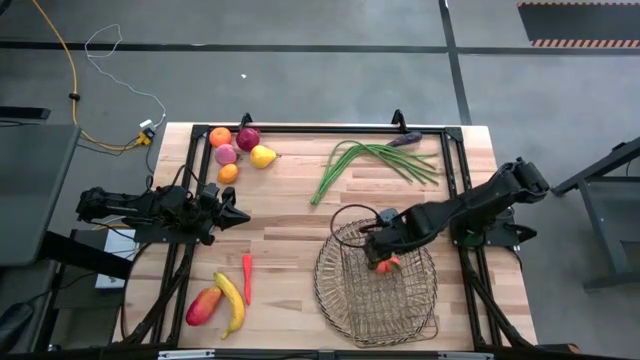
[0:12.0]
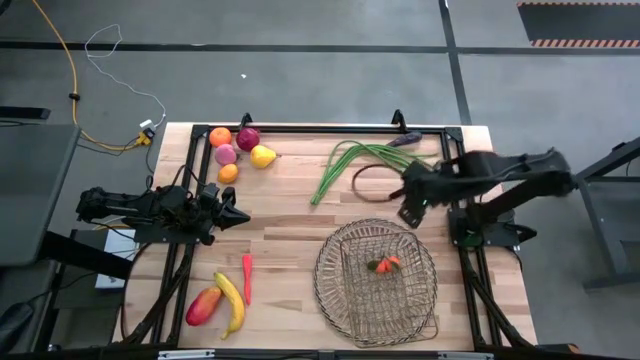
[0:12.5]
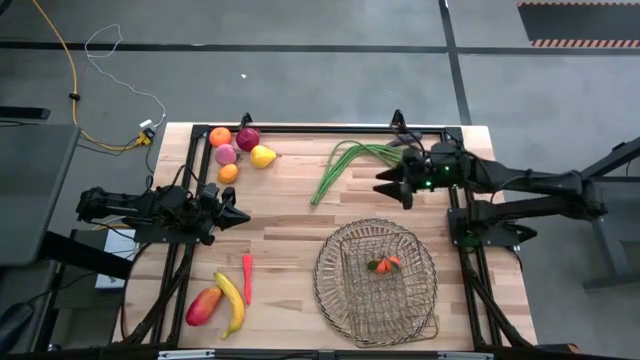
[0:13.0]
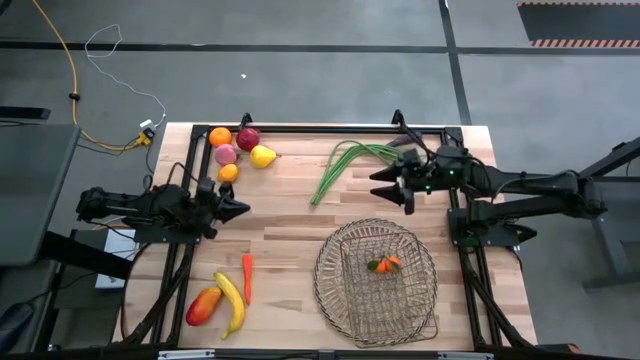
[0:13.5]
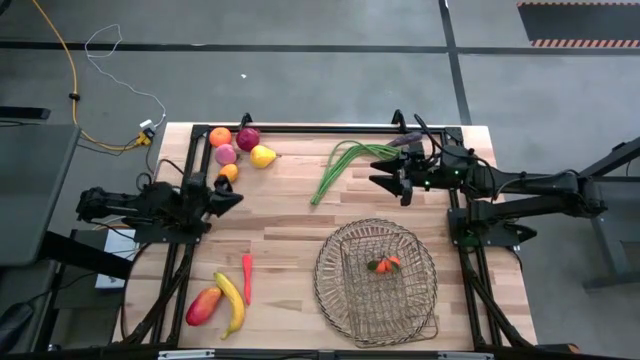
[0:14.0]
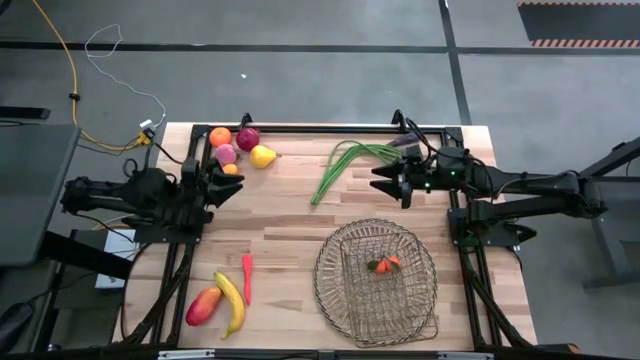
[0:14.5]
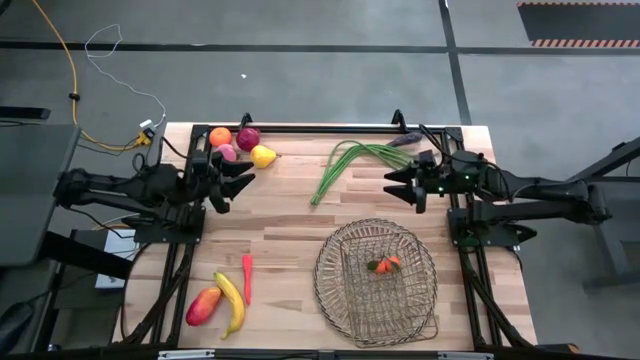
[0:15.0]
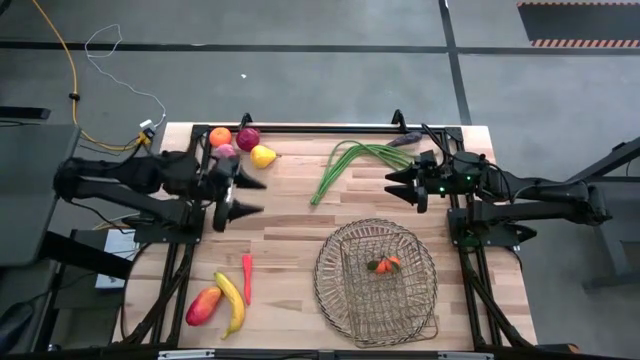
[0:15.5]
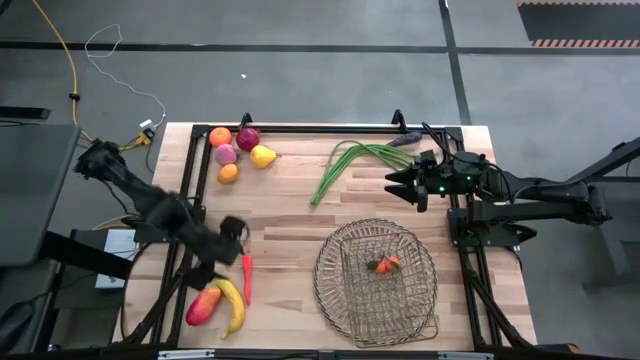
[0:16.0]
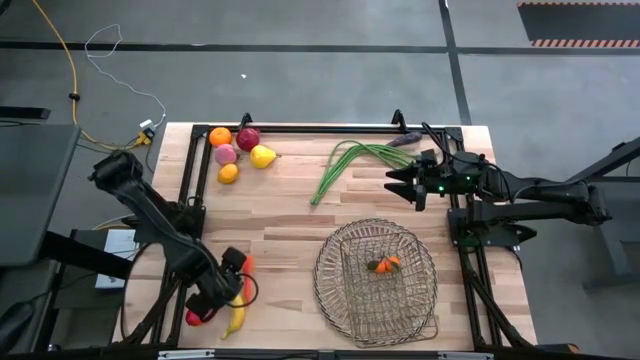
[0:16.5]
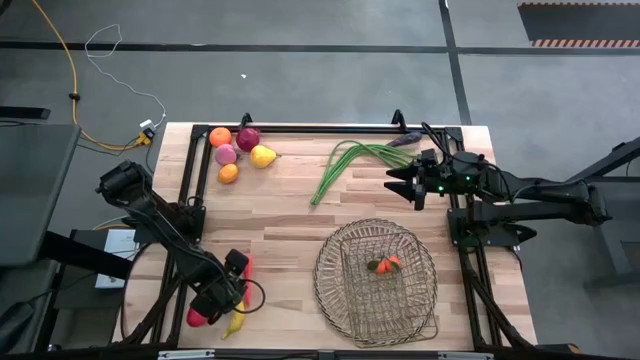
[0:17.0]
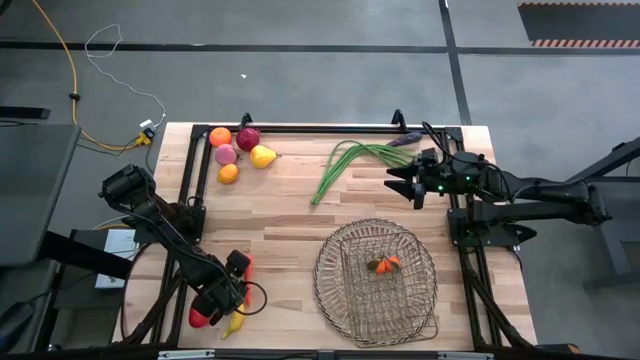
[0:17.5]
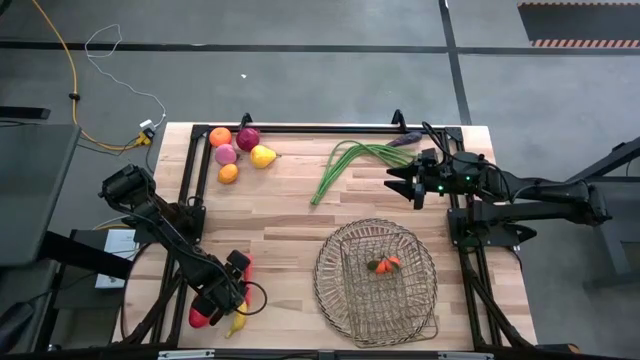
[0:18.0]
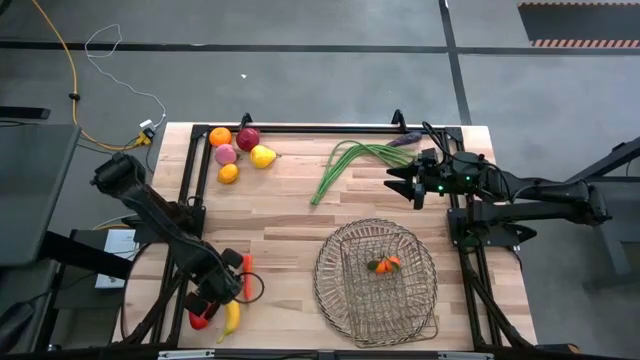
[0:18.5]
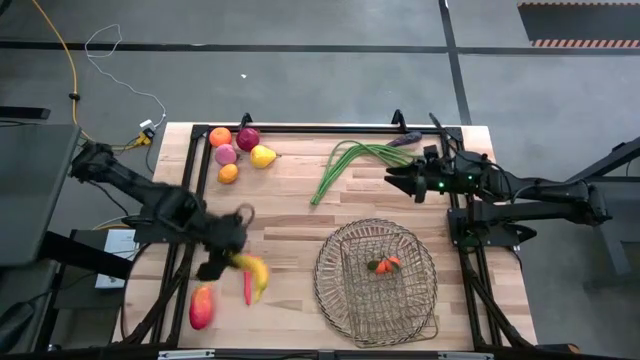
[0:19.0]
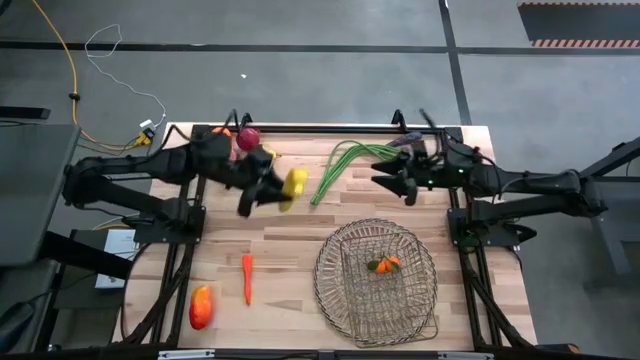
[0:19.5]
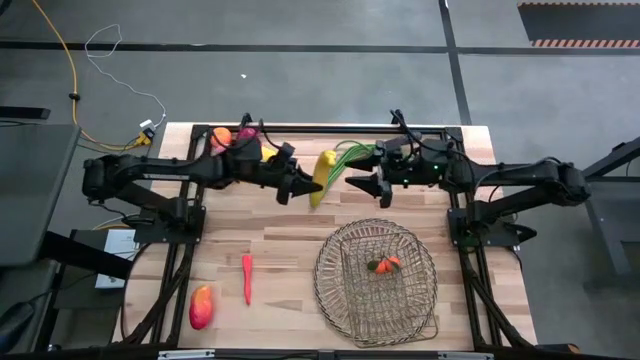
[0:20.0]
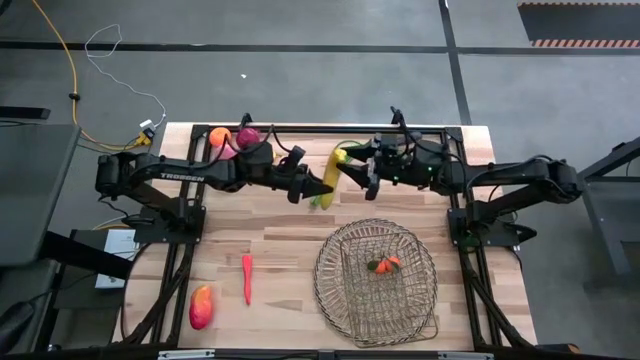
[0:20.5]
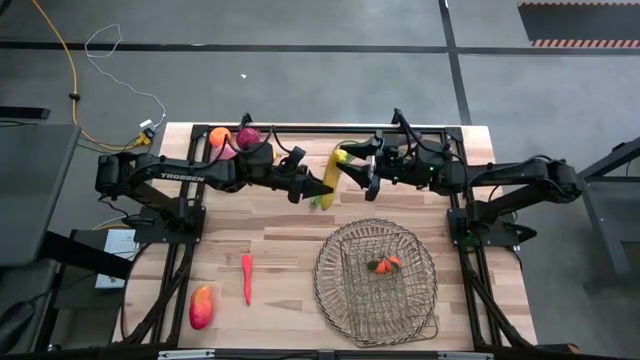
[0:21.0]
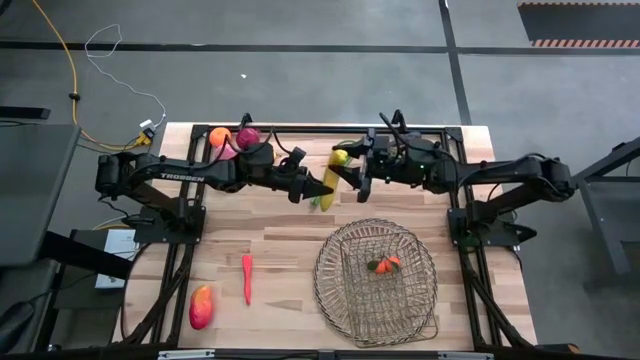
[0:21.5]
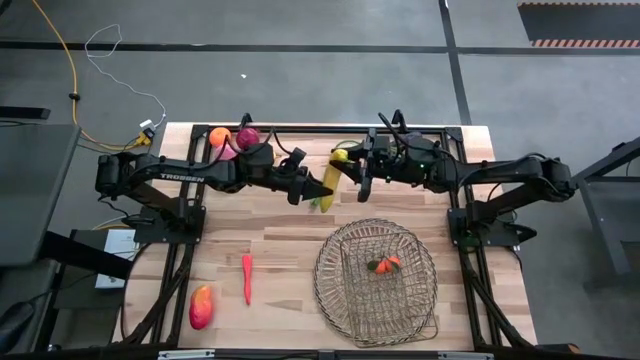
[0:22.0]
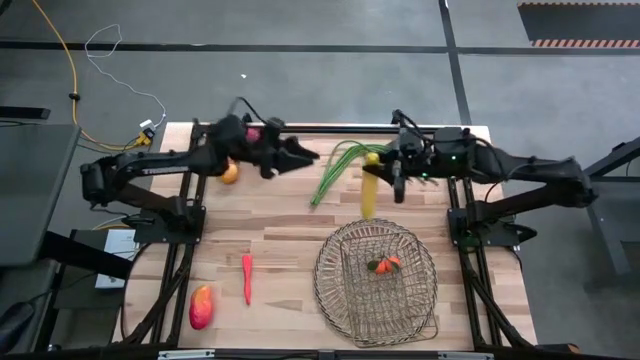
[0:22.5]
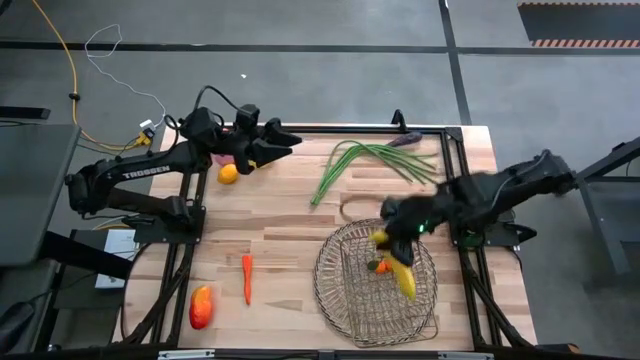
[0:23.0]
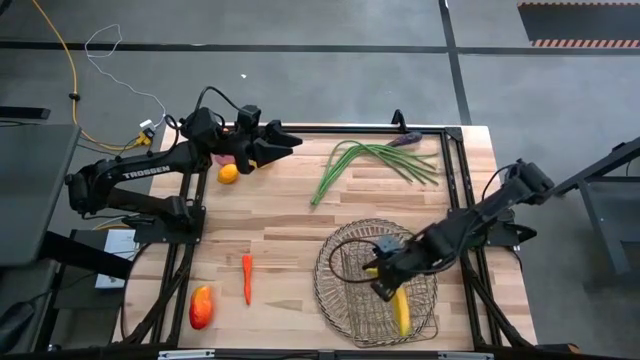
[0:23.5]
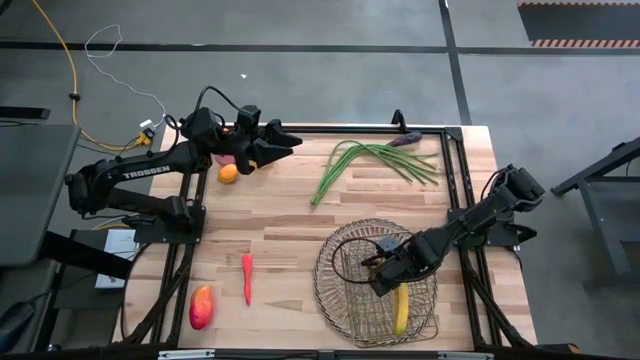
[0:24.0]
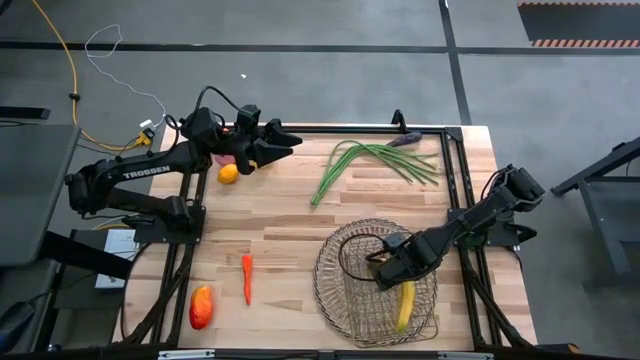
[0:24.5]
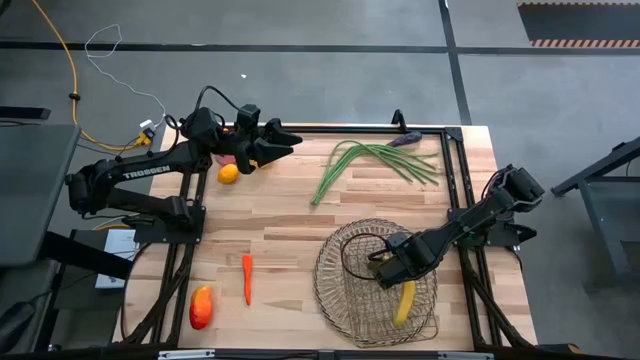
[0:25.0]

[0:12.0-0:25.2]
Task: Build produce basket
Put the banana into the wire basket

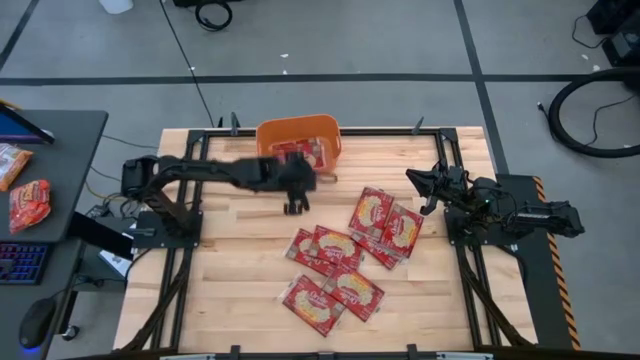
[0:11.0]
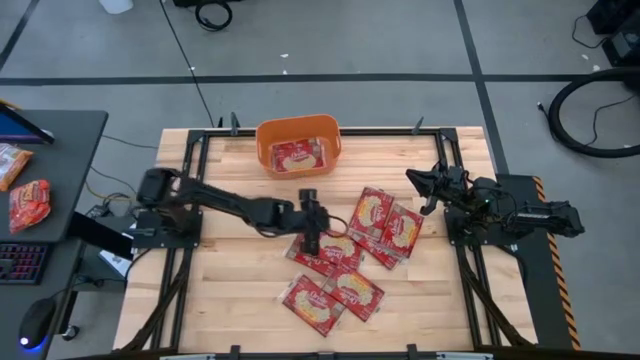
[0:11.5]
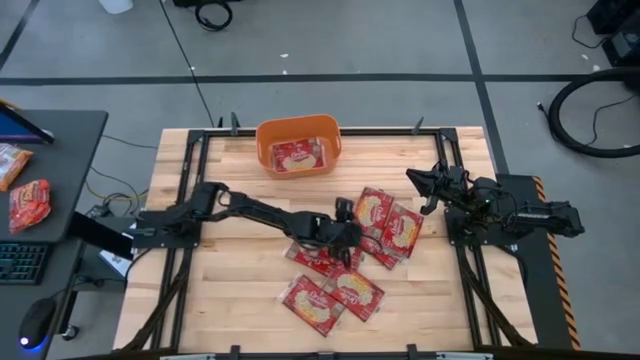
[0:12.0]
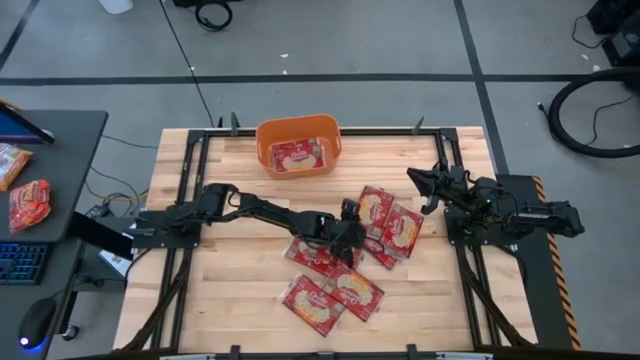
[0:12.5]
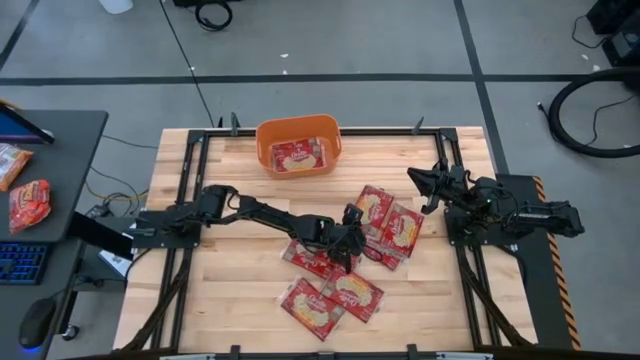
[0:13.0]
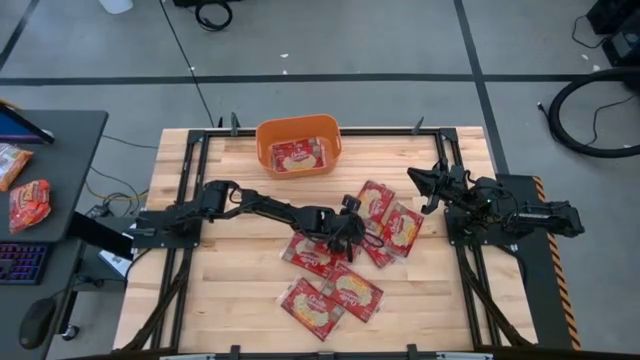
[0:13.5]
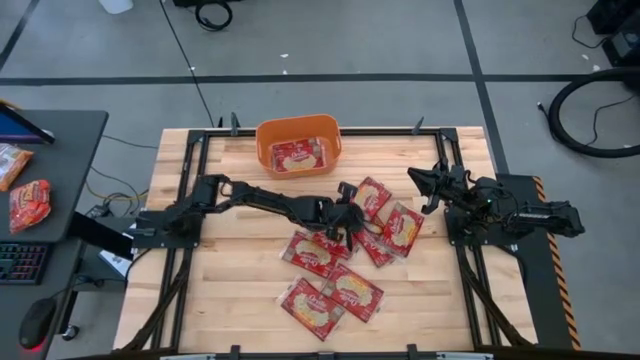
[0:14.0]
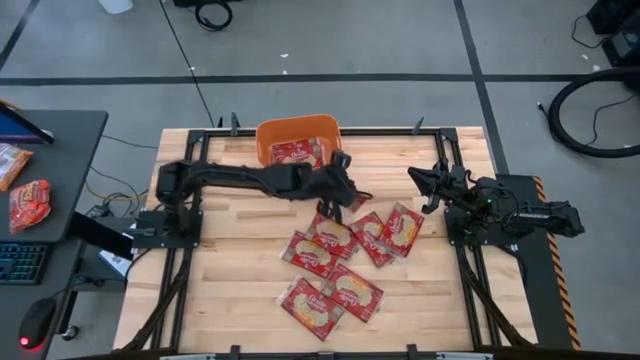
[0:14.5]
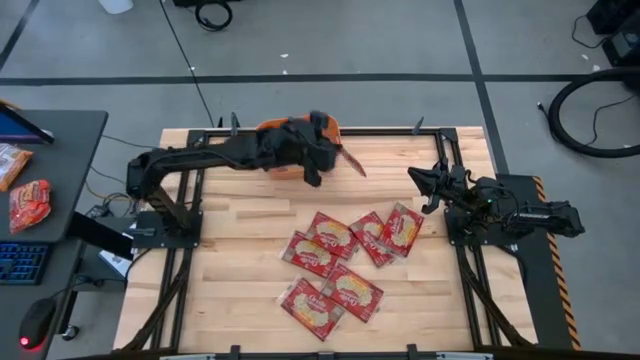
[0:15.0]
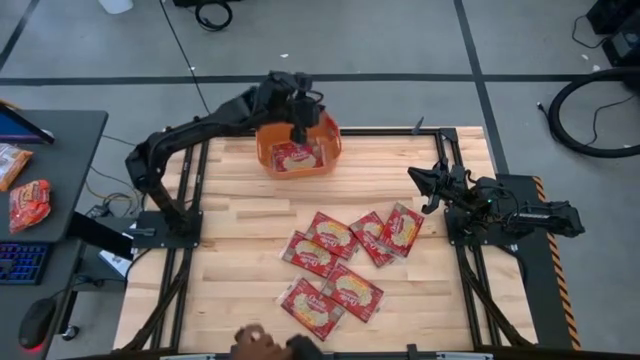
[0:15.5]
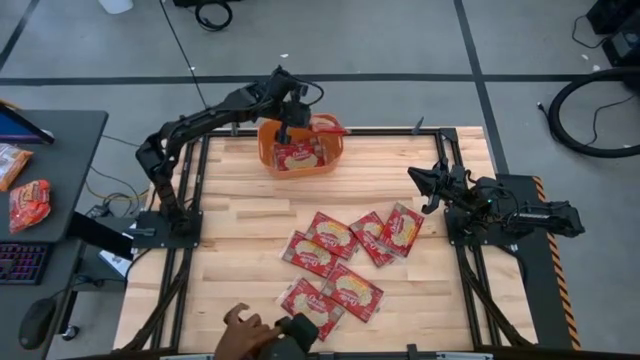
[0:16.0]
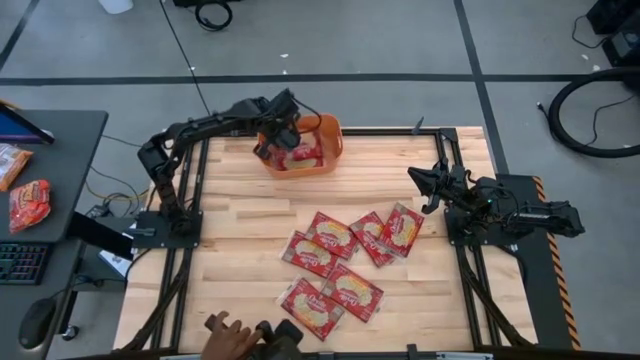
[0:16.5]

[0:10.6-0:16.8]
Task: Sort popcorn bags into baskets
Put the red popcorn bag into the orange bin

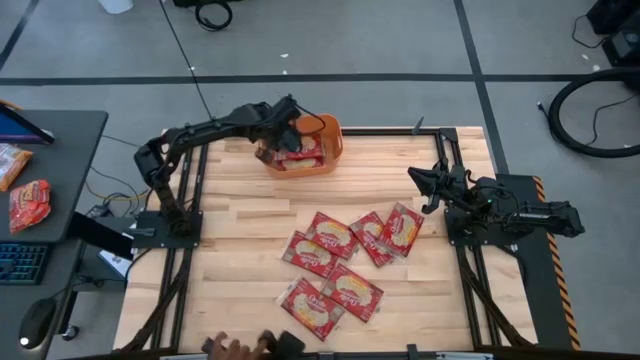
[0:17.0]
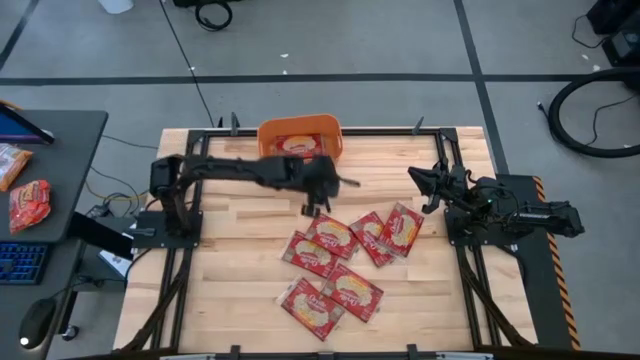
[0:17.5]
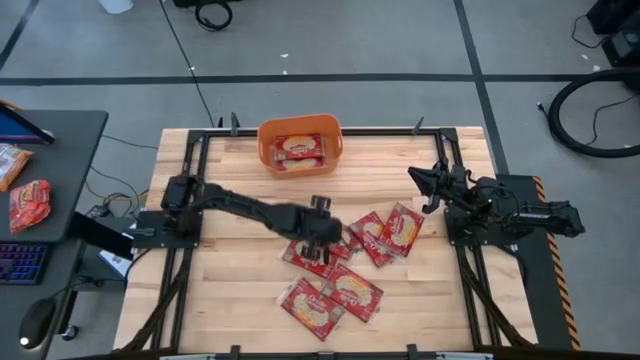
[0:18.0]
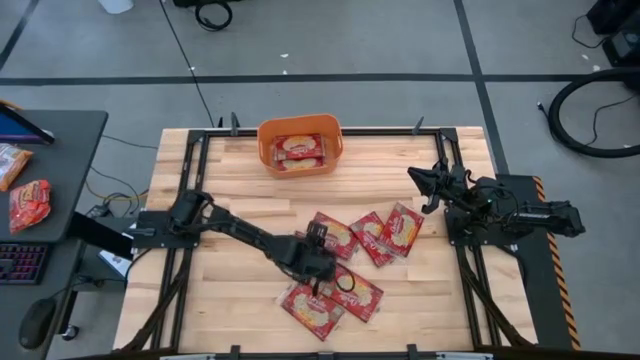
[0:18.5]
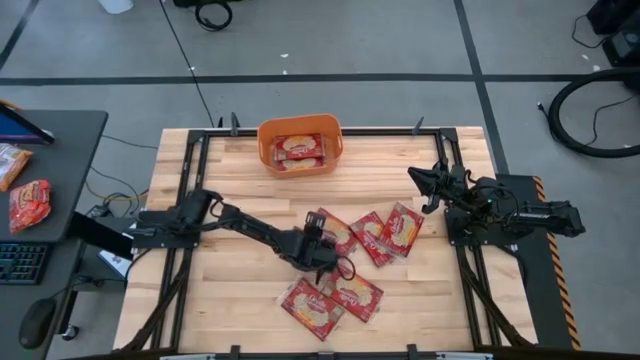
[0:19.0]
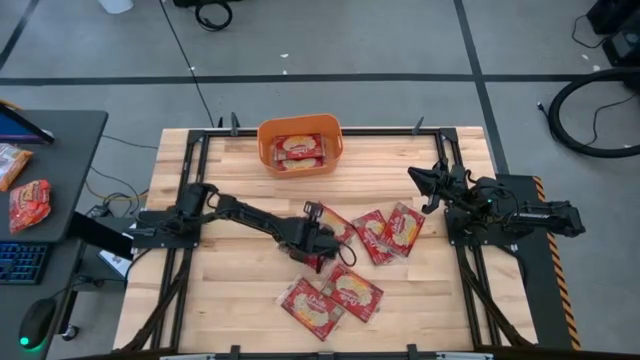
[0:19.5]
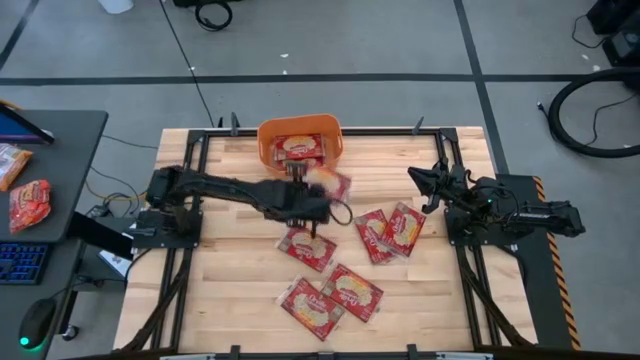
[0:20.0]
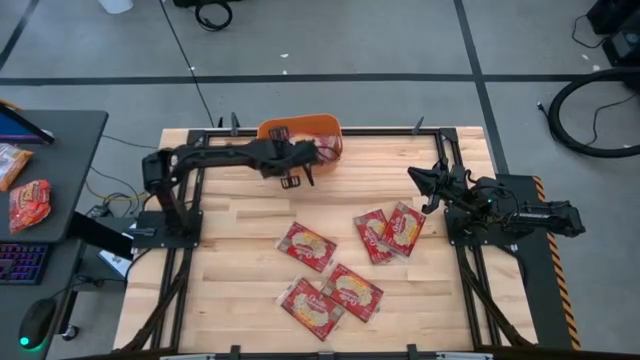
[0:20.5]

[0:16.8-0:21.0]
Put the red popcorn bag into the orange bin
